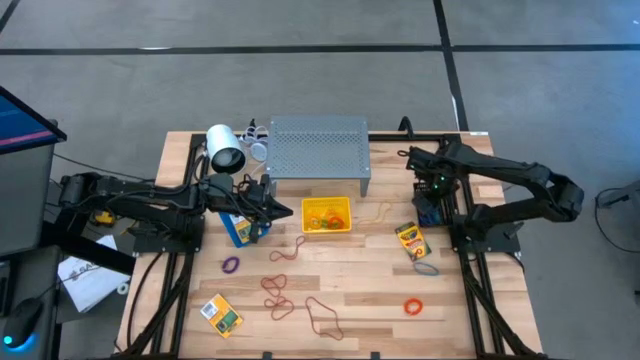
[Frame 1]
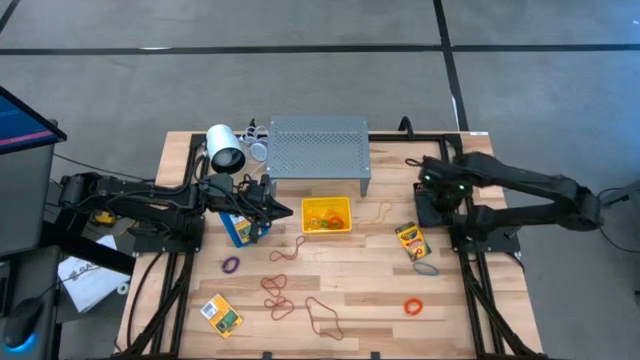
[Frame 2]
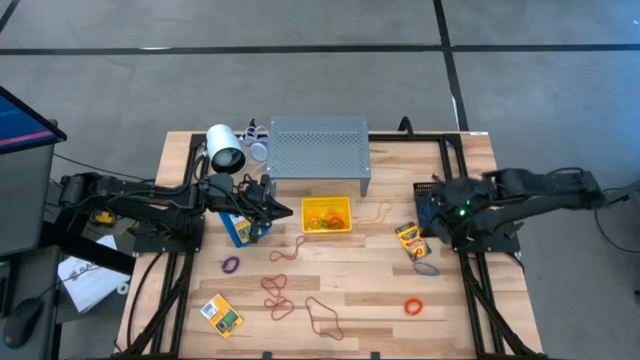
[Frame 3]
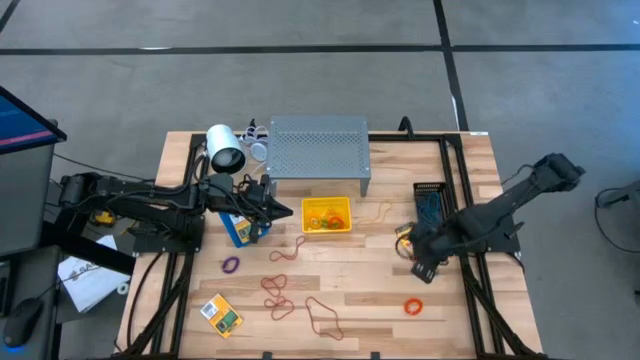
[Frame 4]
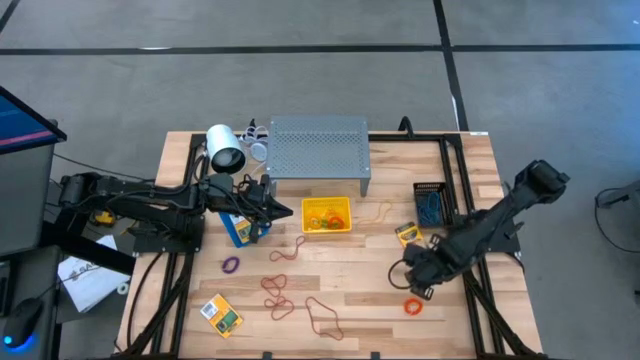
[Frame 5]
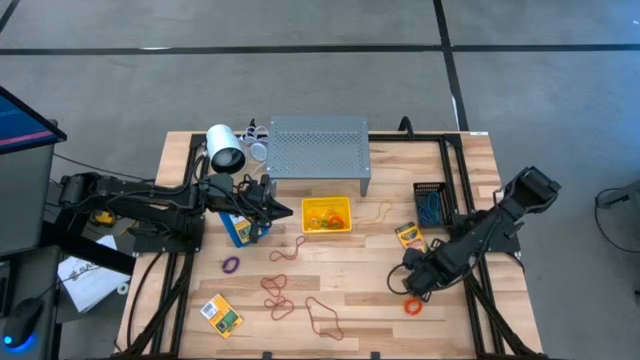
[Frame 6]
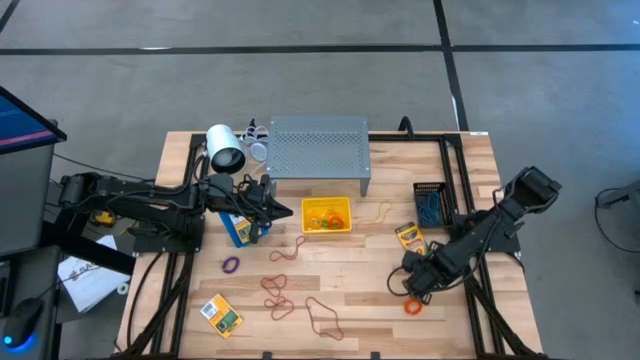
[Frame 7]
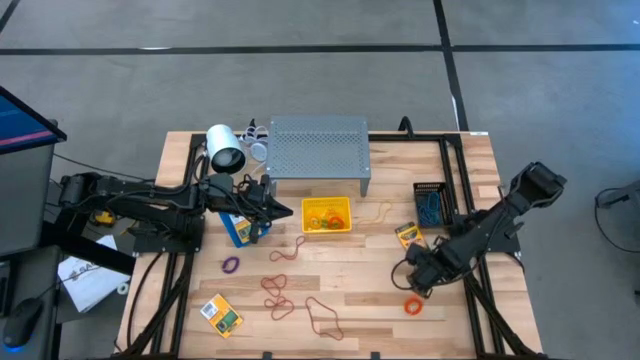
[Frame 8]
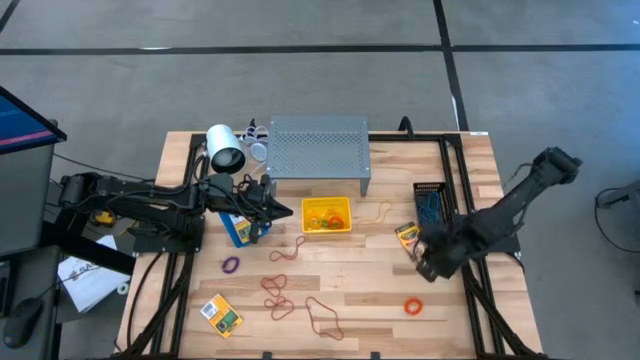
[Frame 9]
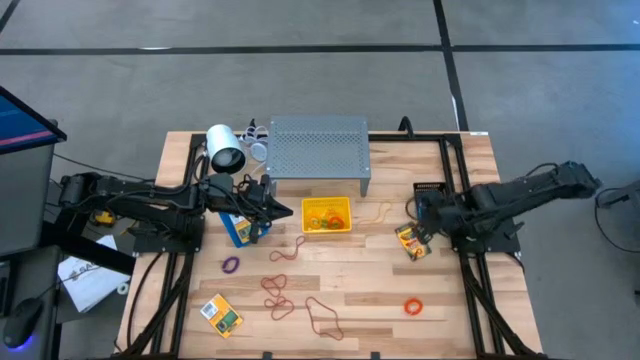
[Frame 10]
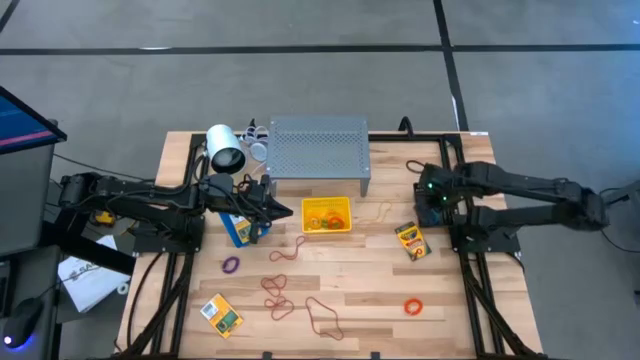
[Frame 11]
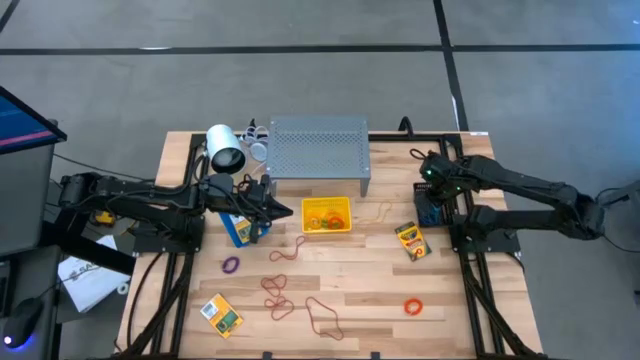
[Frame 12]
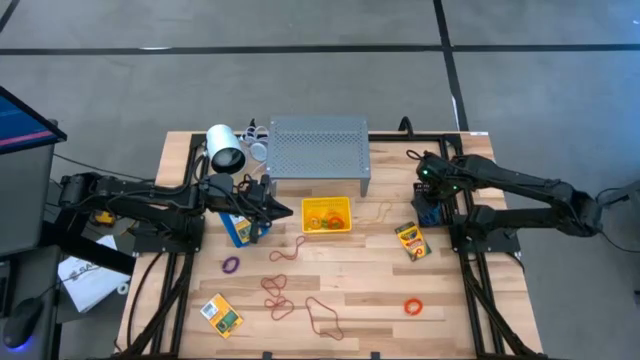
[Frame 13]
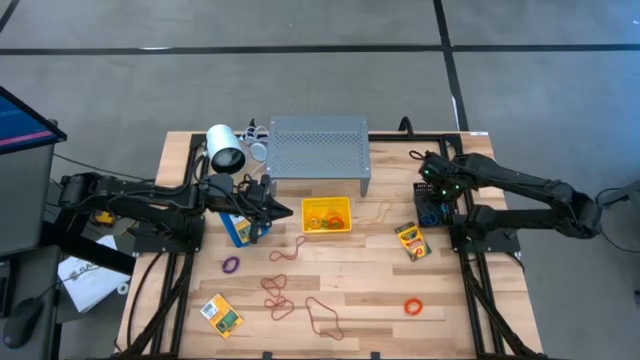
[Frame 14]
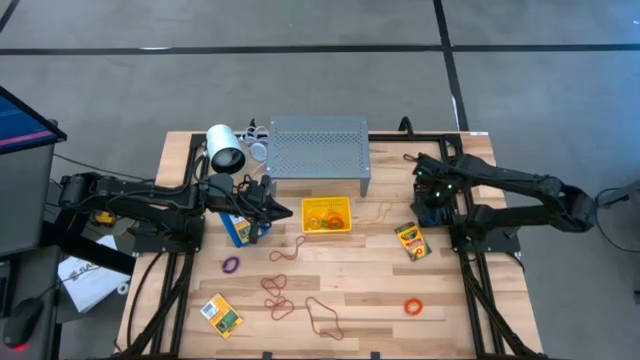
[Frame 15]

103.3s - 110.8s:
Task: Pick & Place Office Desk Supplies
Put the blue rubber band into the black bin

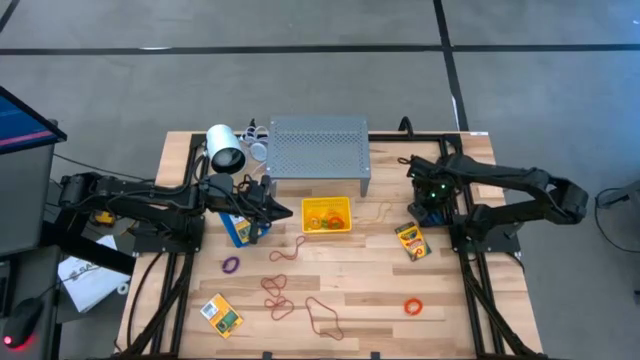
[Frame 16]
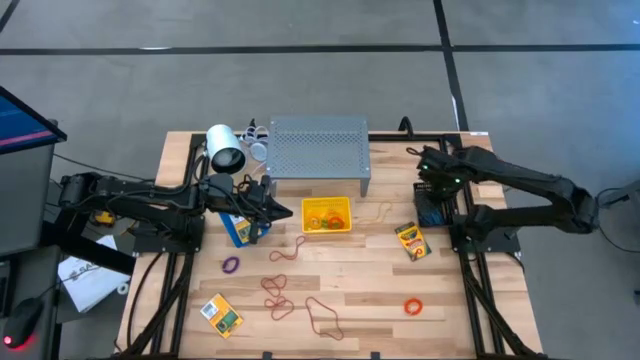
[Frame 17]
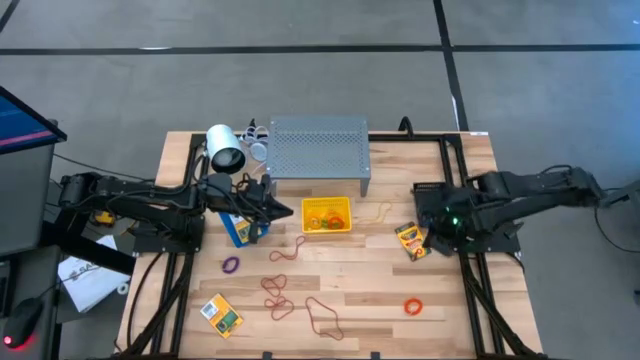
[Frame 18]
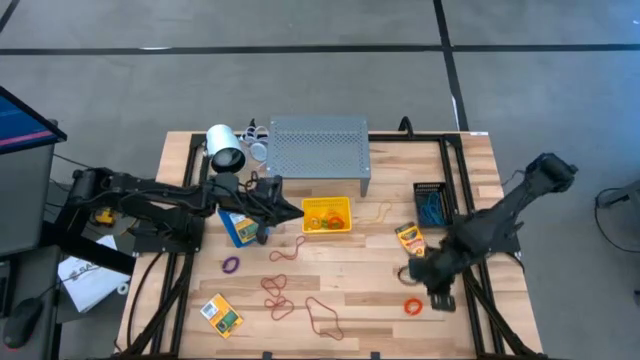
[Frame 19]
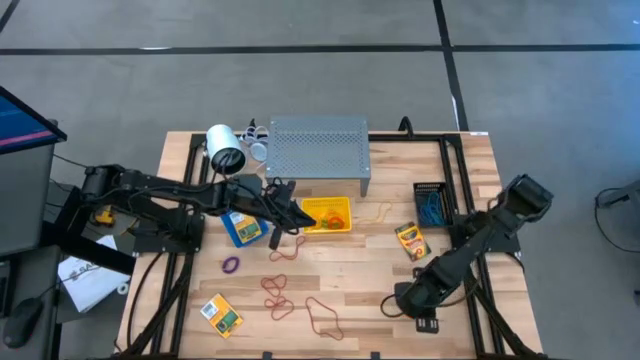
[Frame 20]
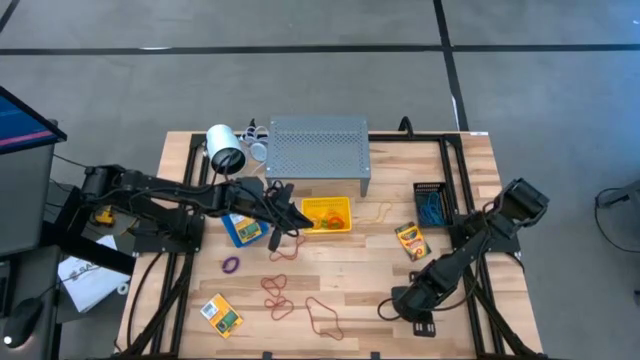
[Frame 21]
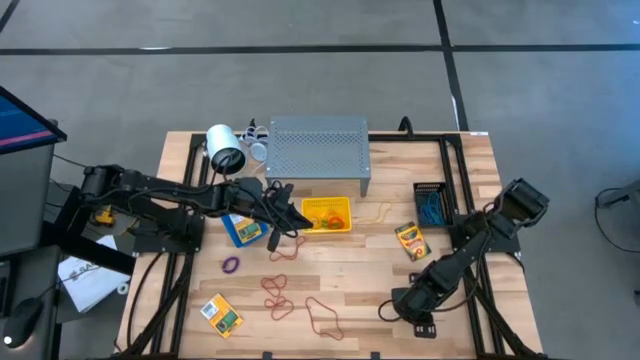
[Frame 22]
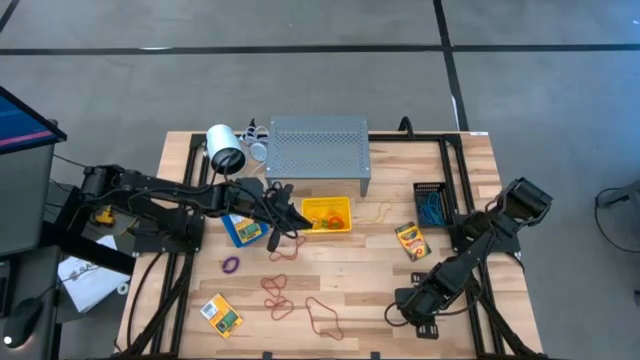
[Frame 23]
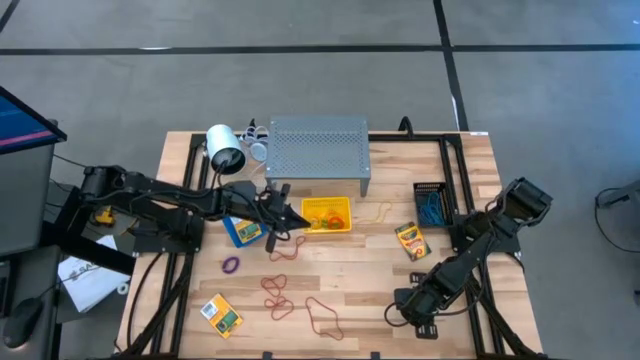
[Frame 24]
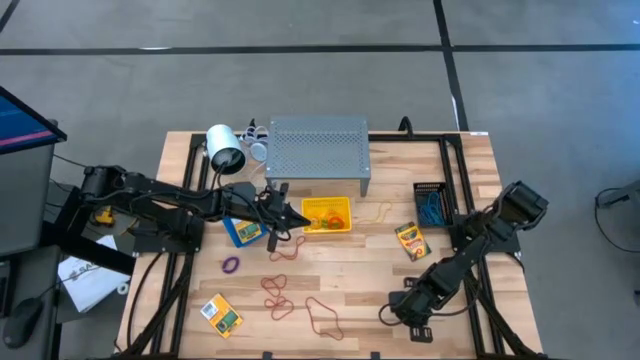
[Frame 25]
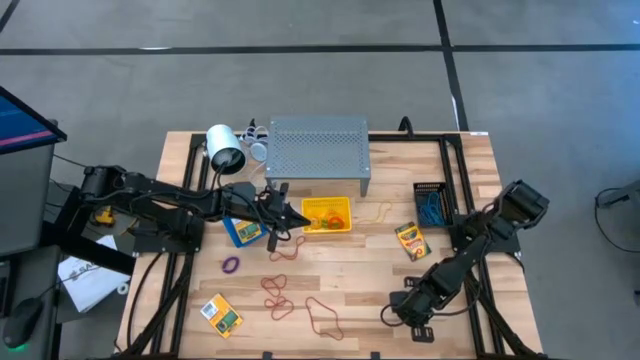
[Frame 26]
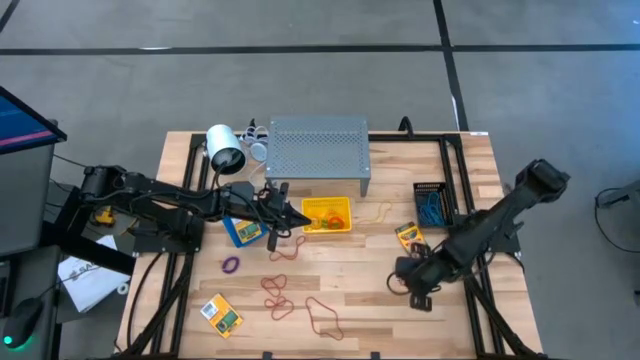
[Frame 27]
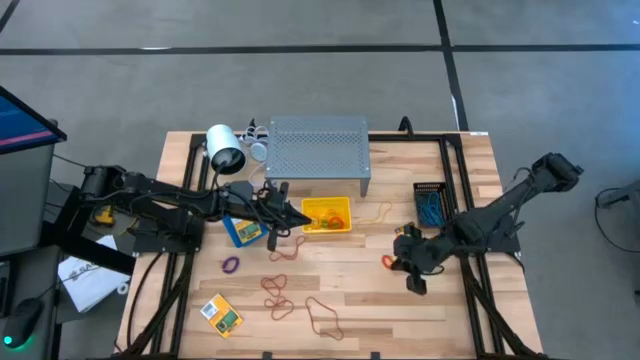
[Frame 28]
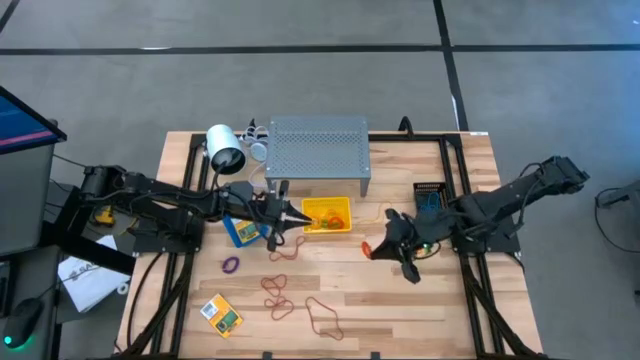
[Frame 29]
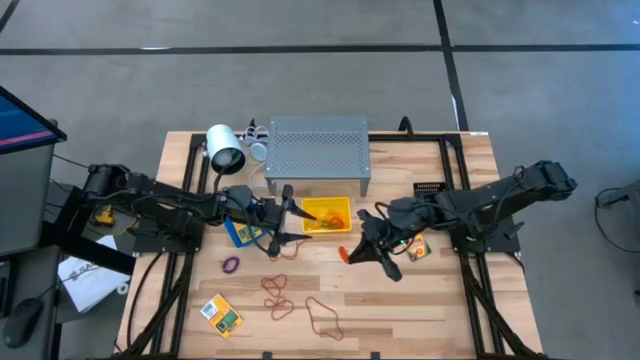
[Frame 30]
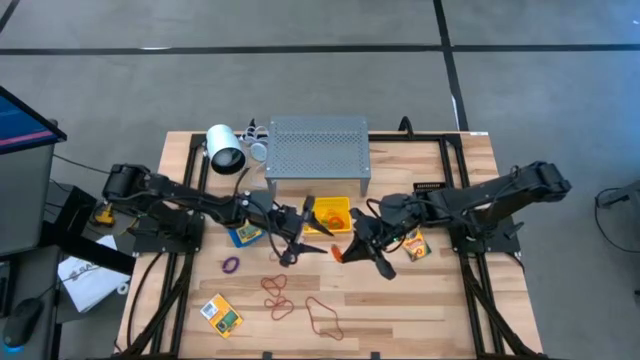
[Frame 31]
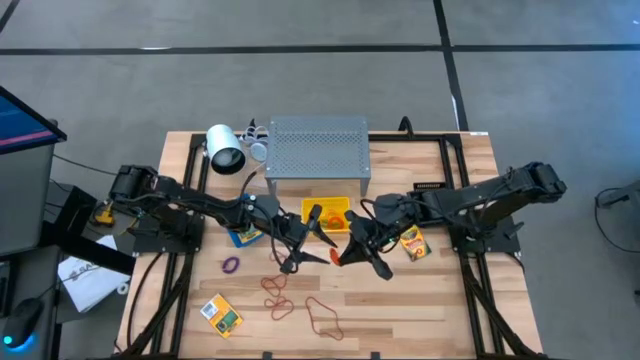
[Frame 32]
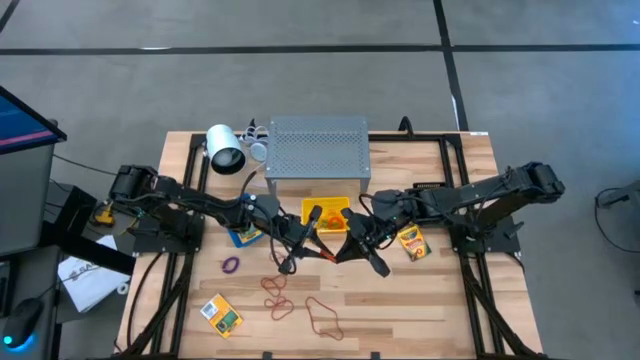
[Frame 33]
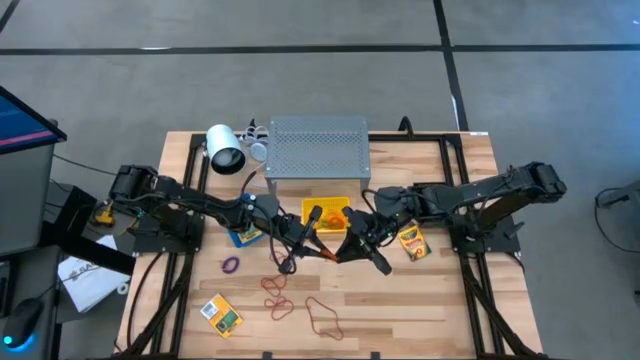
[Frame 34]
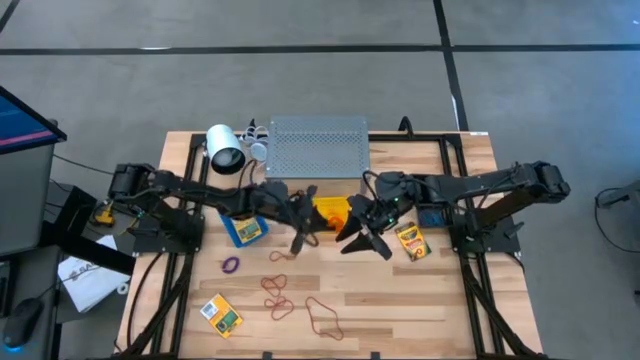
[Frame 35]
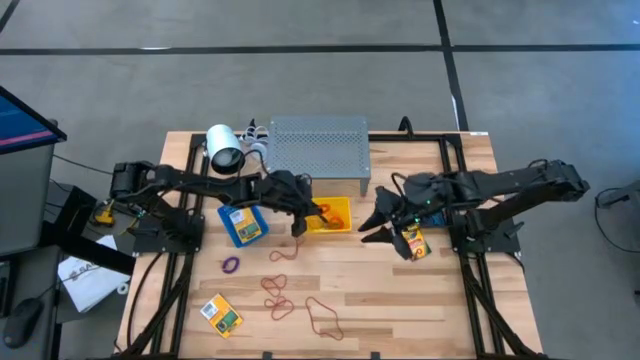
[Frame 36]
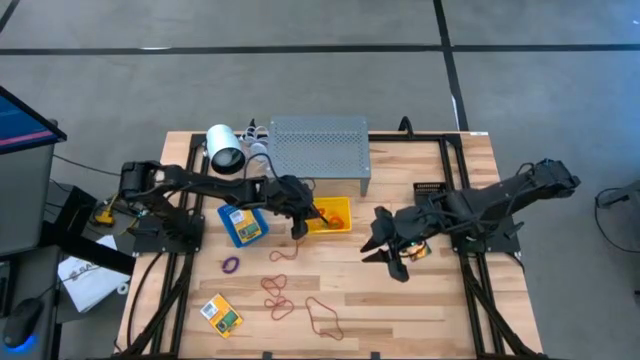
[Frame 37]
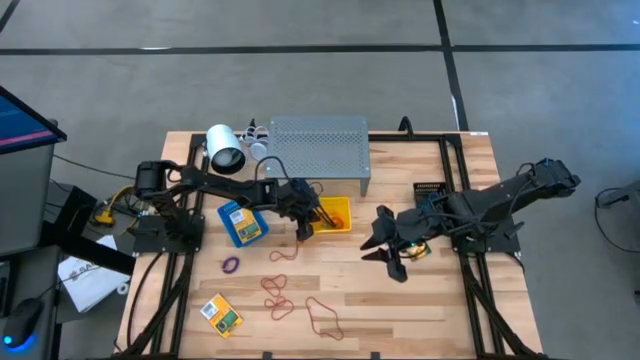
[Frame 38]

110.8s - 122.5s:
Put the orange spring keychain into the yellow bin

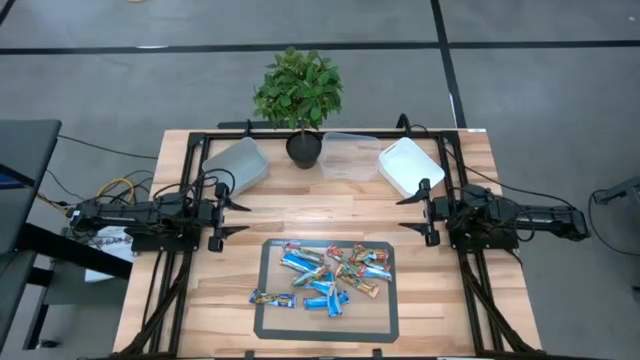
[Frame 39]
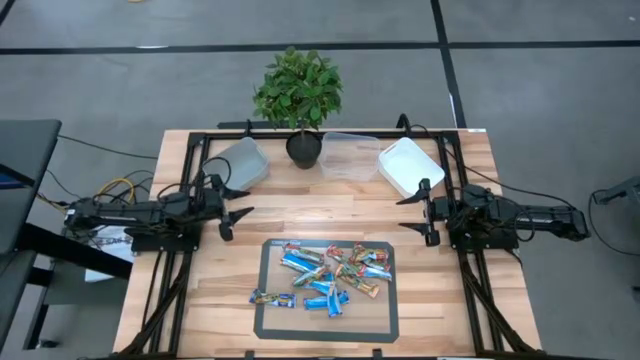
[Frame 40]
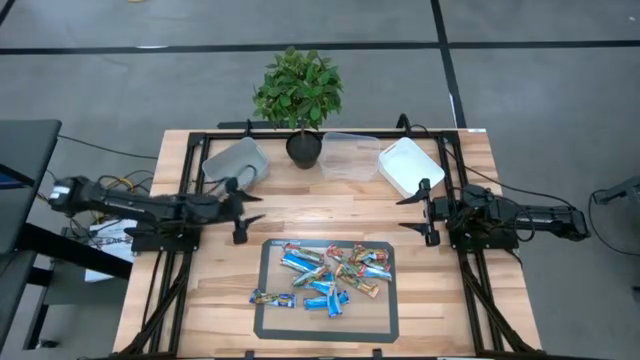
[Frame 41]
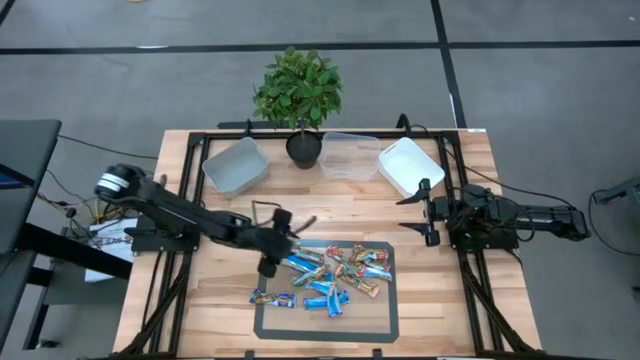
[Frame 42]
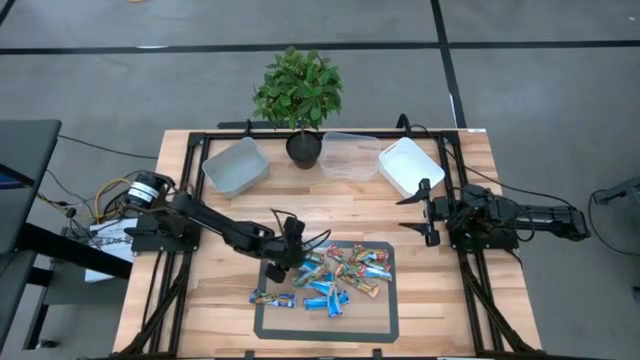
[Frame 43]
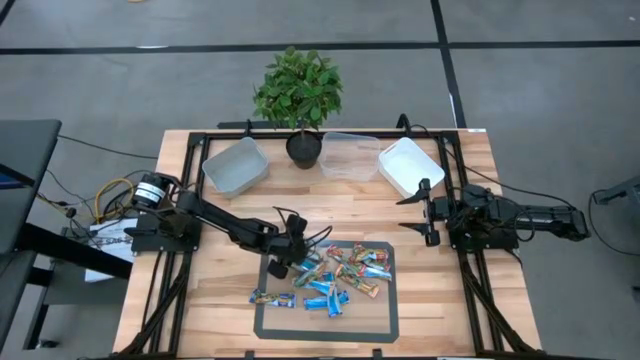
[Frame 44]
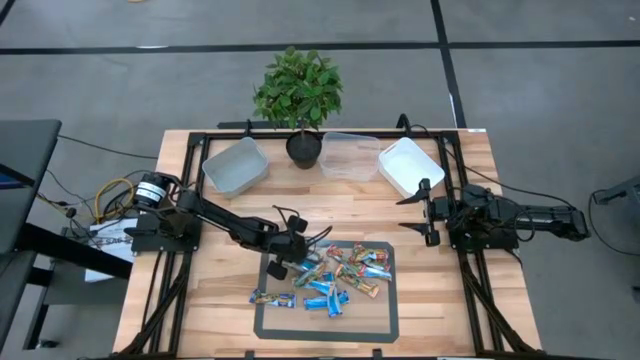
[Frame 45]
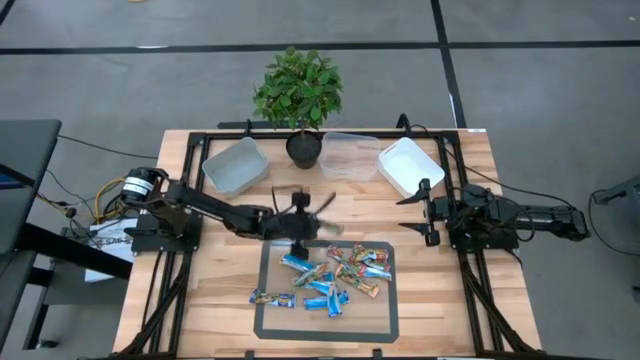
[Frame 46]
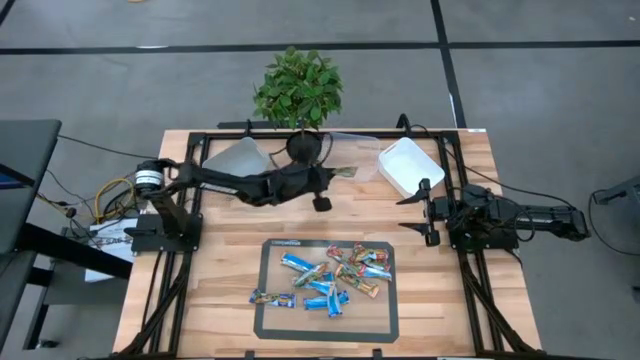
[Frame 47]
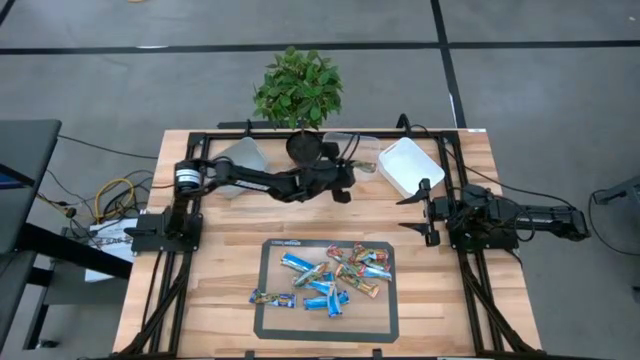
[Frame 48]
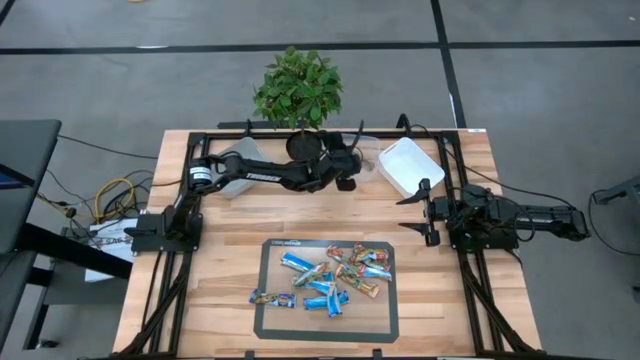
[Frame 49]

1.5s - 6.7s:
Task: Pick and place Granola Bars by type
Put the red granola bar into the transparent bin
